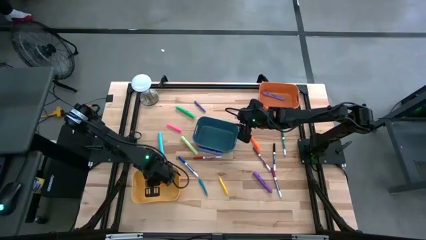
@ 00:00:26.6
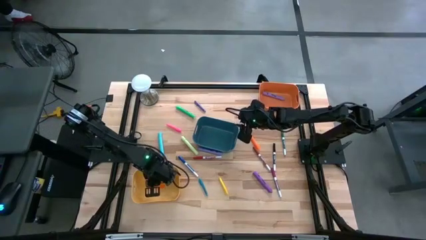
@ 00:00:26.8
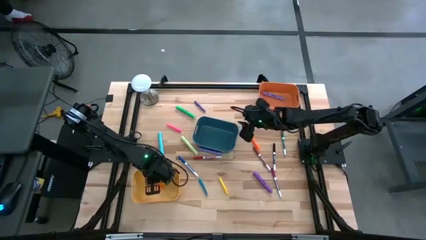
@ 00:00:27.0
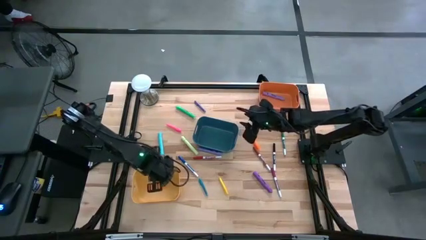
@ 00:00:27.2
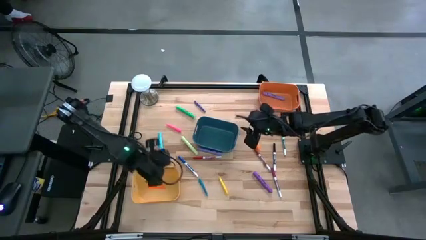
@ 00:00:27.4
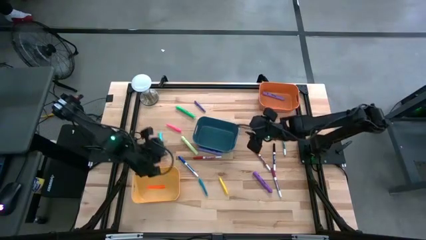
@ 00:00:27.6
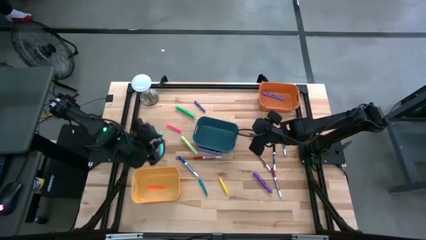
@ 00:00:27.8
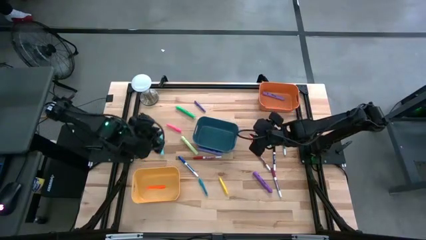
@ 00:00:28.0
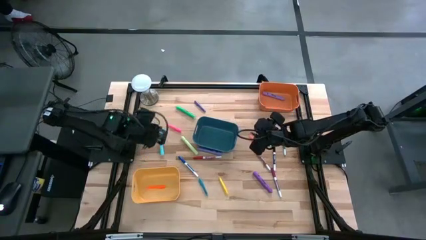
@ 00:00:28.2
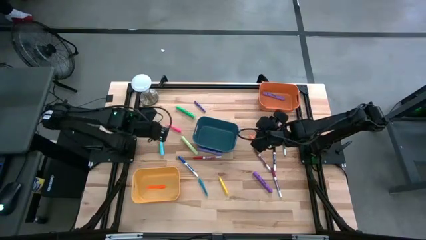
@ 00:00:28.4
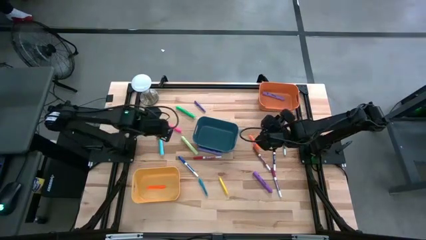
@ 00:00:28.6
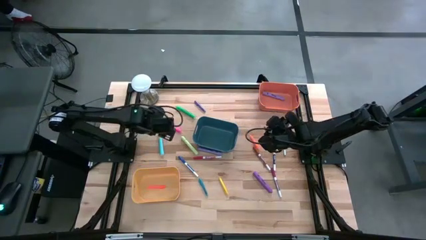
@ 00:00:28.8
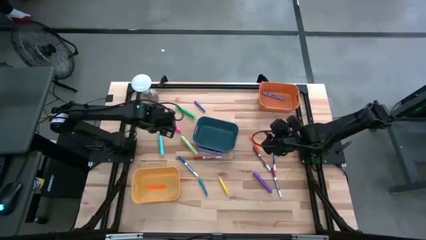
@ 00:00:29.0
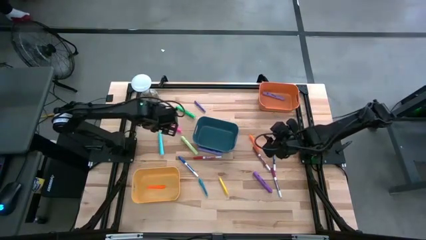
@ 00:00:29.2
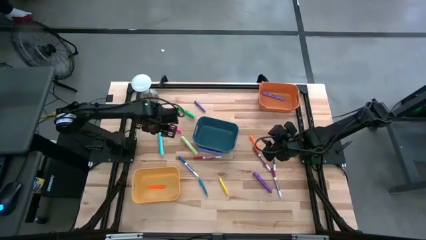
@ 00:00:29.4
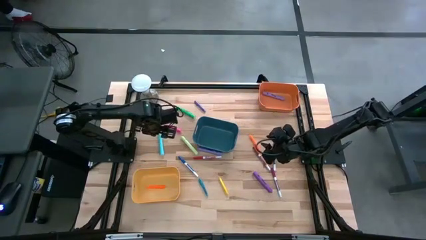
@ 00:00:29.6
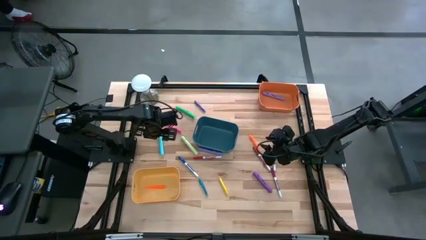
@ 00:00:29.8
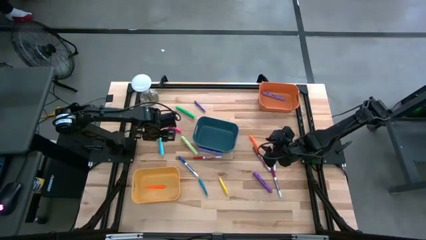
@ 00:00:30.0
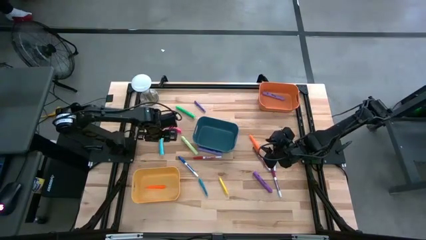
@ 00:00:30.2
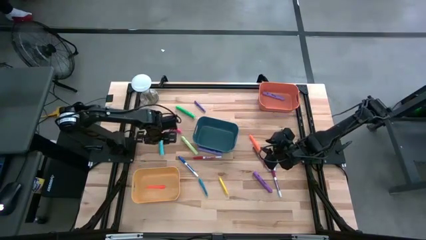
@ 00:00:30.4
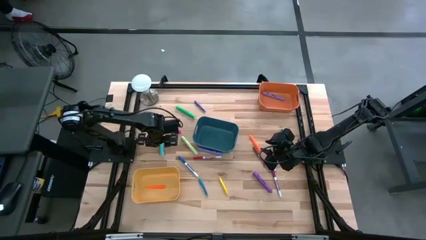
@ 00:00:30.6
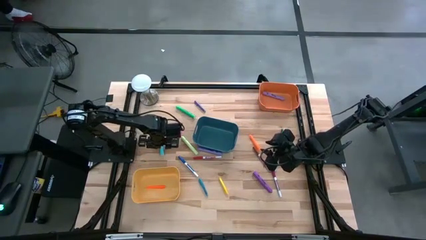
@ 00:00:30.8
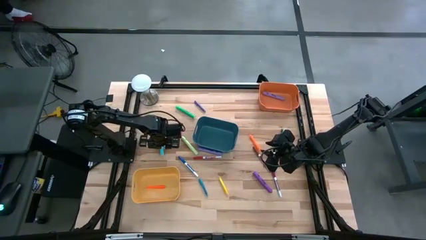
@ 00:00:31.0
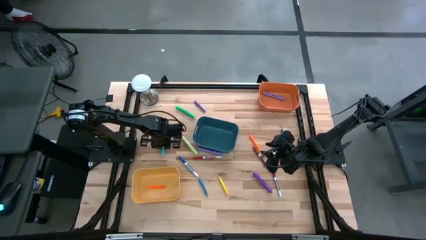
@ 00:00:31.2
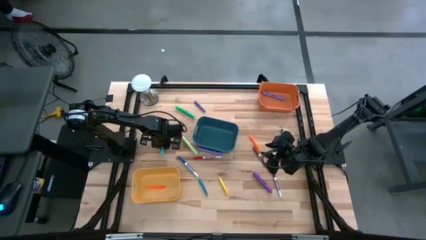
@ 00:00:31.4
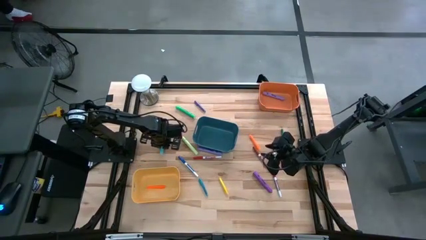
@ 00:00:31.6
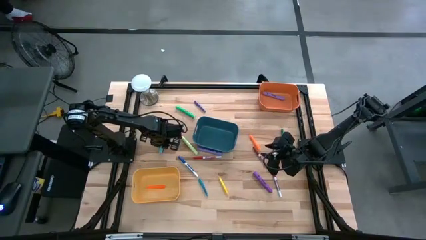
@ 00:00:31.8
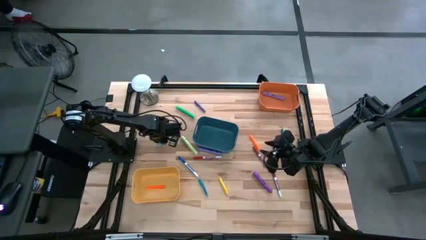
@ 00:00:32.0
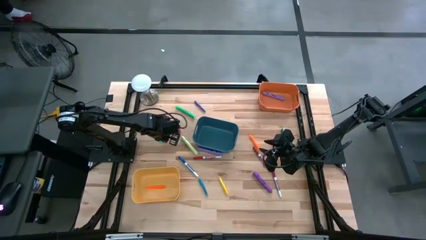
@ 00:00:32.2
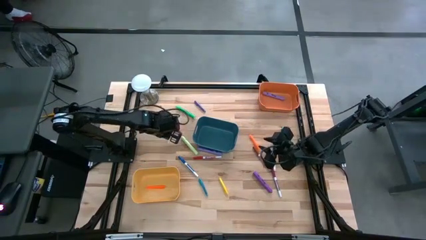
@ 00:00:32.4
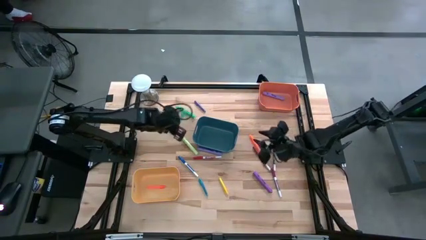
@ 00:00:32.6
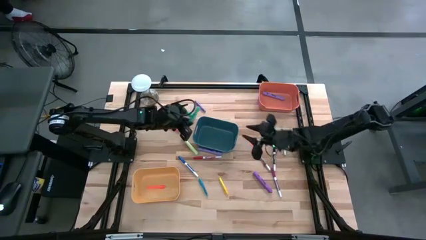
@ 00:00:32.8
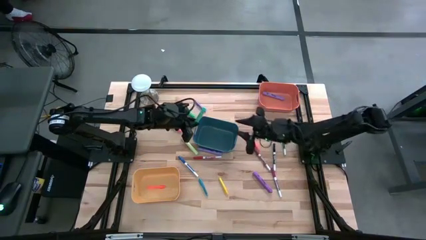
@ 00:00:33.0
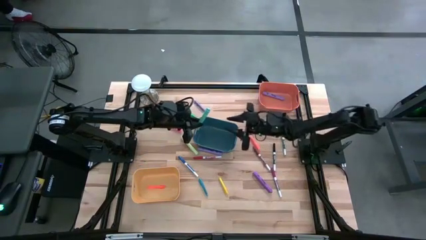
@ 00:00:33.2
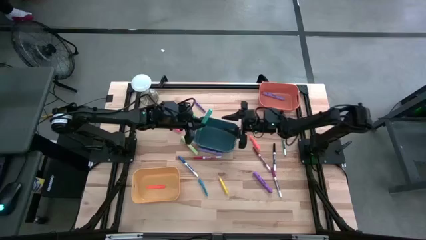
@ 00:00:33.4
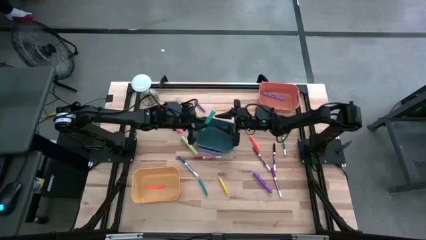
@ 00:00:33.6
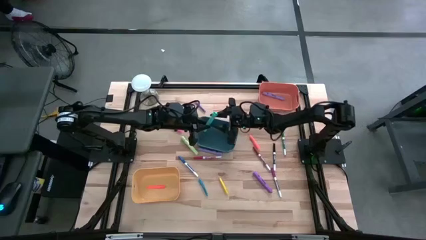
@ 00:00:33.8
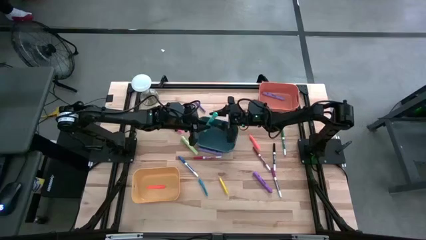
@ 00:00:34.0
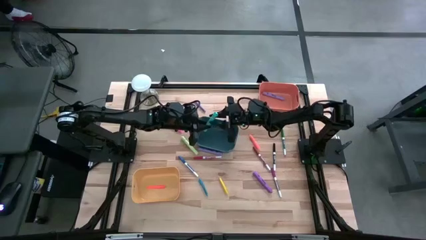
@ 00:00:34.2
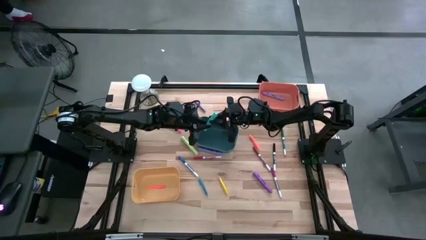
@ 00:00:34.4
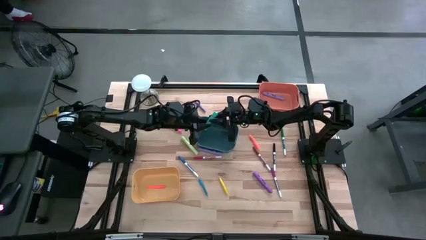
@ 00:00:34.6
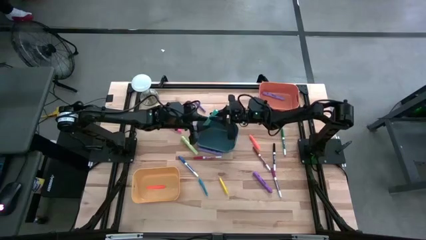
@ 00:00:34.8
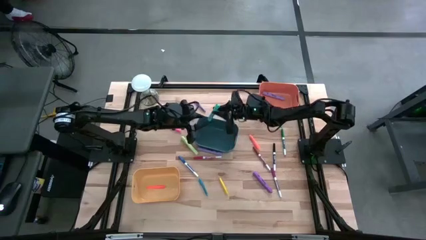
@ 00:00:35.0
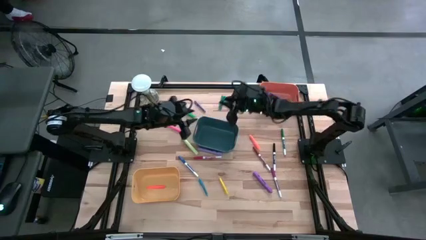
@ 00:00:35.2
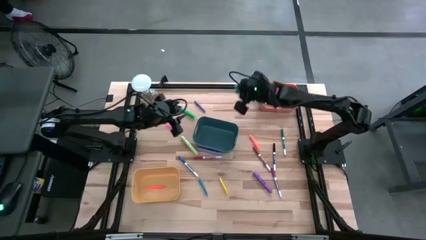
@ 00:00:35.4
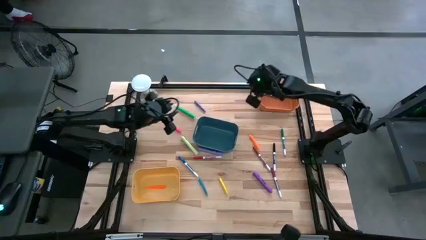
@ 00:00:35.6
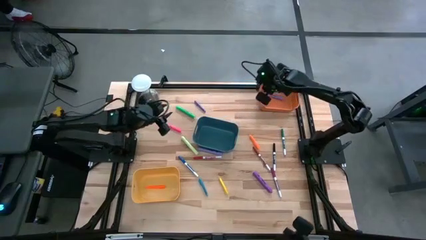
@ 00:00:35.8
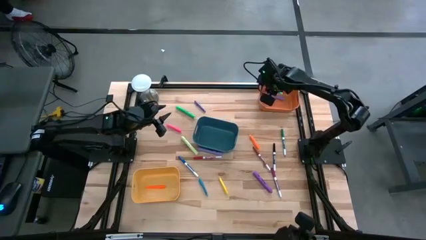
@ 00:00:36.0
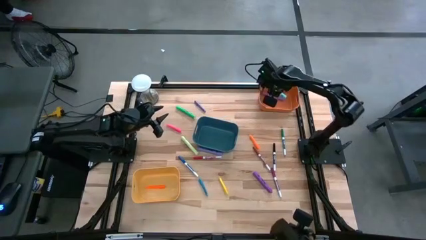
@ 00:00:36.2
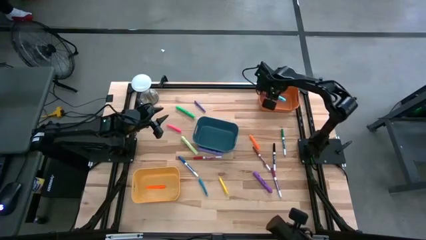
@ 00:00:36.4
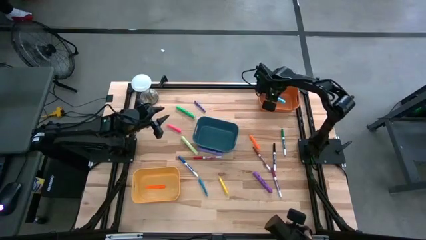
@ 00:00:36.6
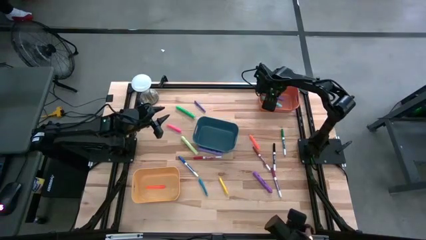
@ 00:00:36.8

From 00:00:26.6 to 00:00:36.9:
Task: Pick & Place Markers
Put the blue highlighter pen into the orange bin
